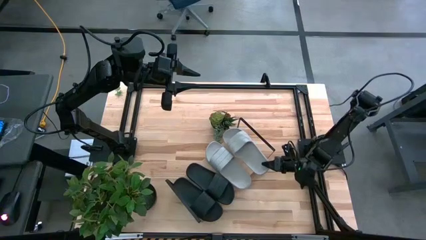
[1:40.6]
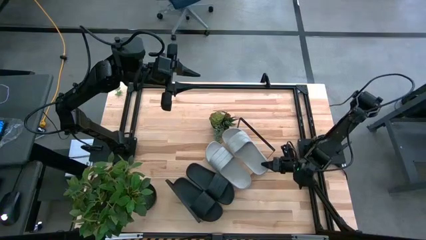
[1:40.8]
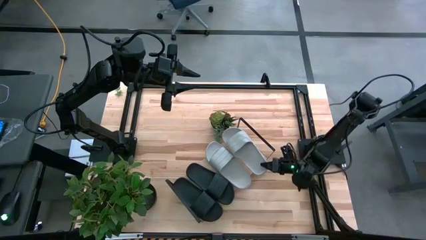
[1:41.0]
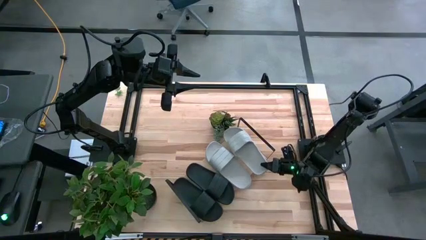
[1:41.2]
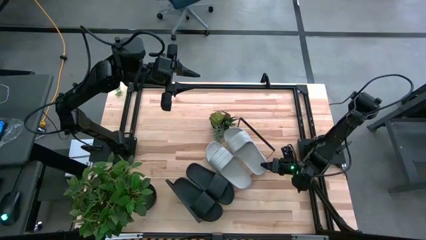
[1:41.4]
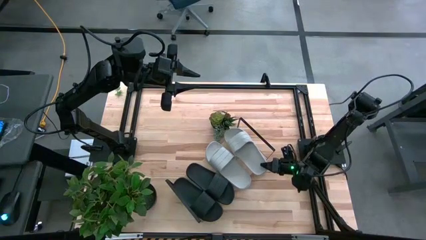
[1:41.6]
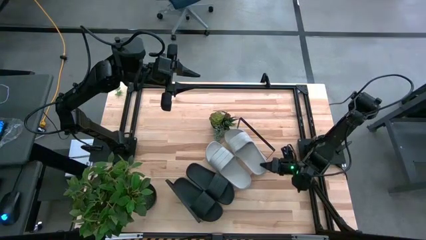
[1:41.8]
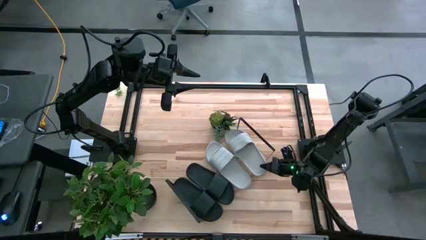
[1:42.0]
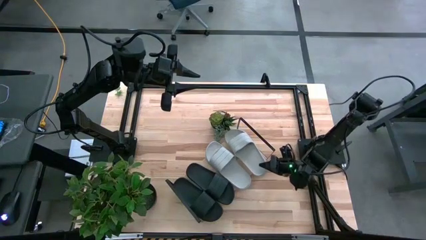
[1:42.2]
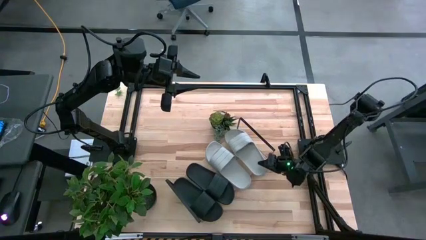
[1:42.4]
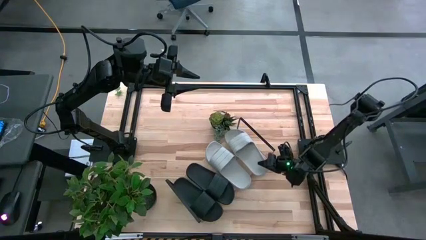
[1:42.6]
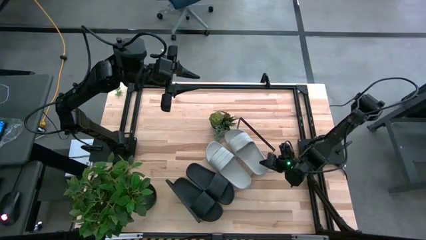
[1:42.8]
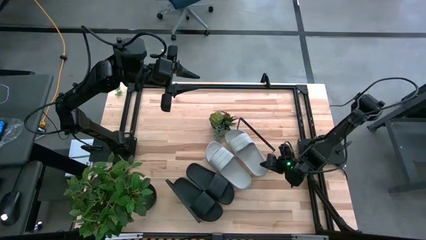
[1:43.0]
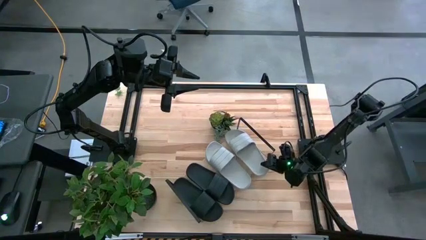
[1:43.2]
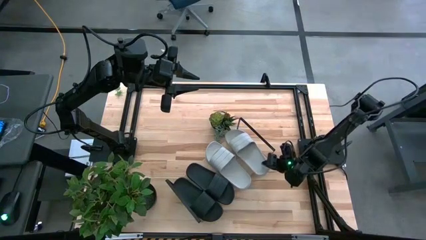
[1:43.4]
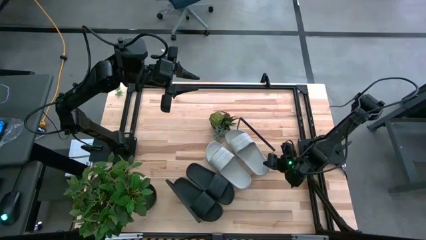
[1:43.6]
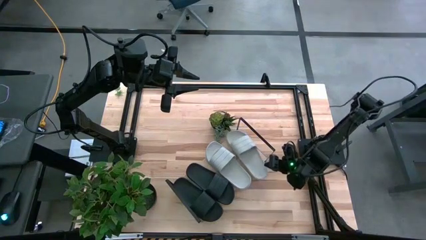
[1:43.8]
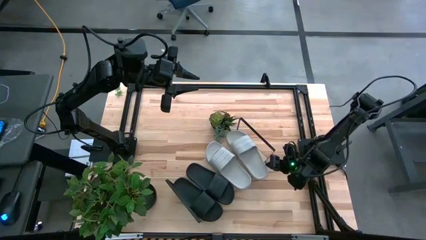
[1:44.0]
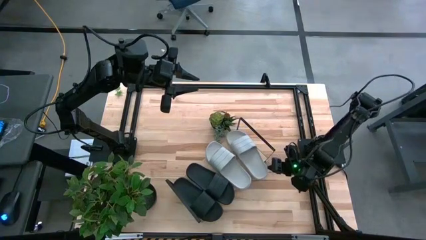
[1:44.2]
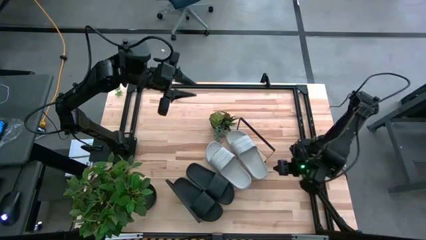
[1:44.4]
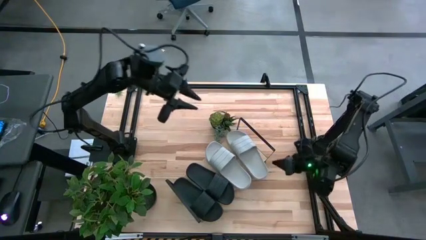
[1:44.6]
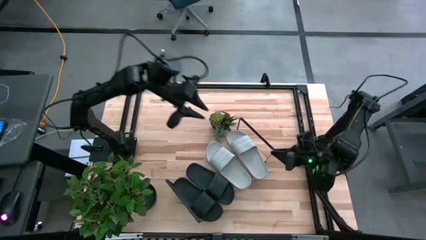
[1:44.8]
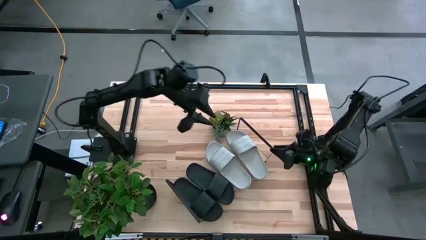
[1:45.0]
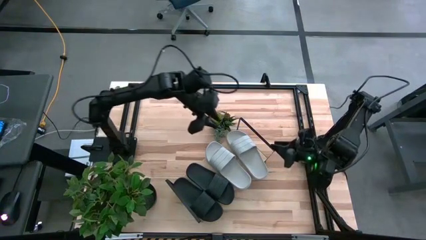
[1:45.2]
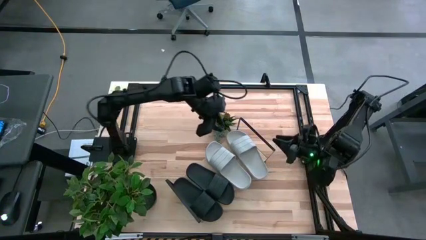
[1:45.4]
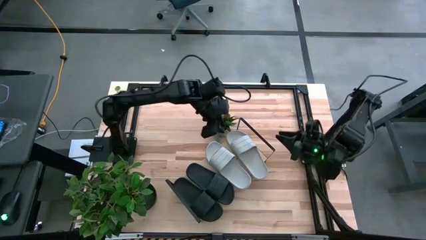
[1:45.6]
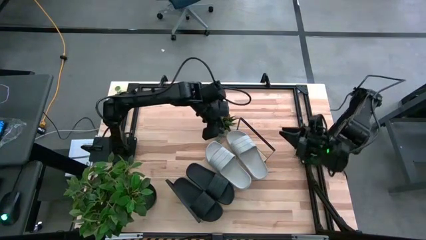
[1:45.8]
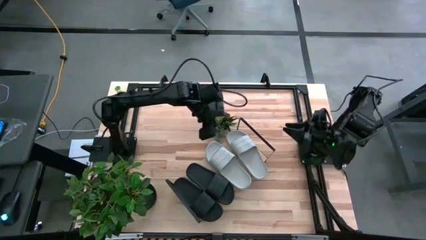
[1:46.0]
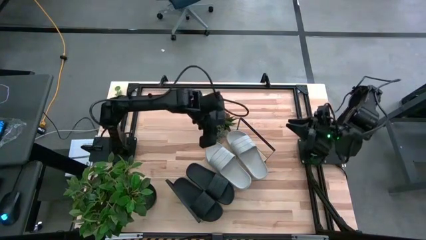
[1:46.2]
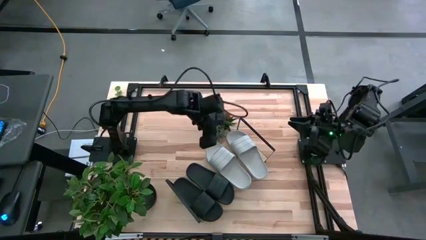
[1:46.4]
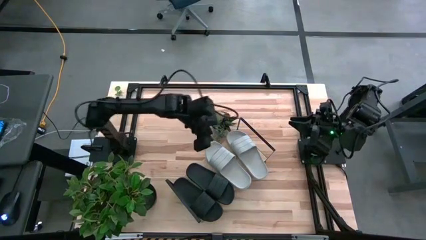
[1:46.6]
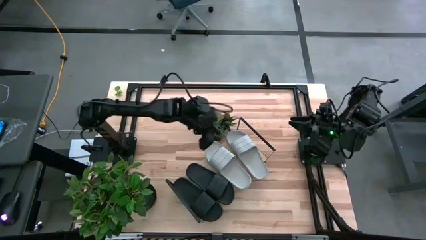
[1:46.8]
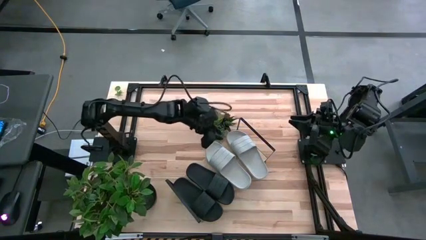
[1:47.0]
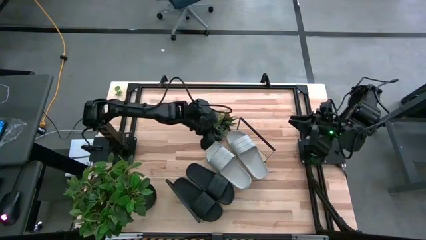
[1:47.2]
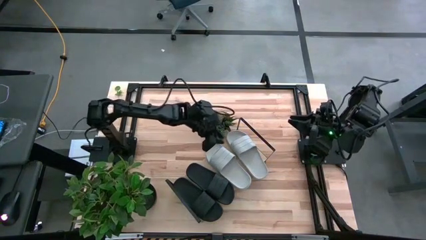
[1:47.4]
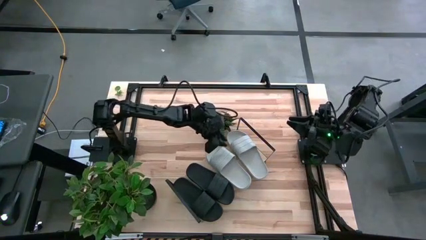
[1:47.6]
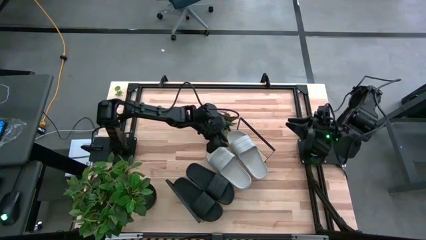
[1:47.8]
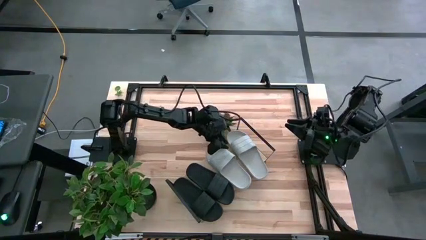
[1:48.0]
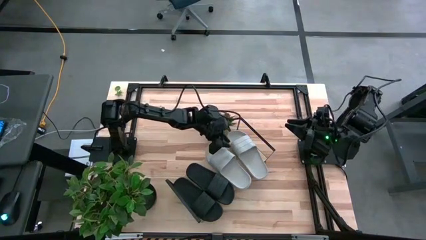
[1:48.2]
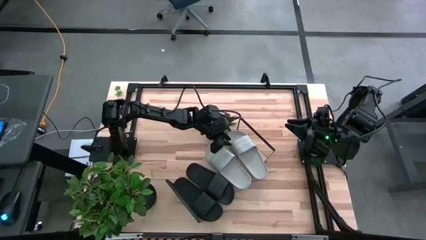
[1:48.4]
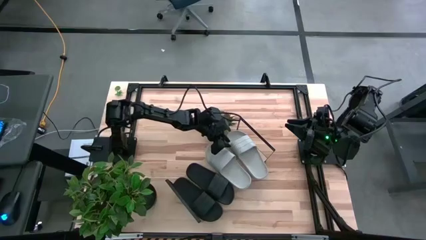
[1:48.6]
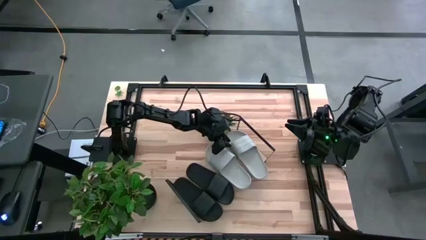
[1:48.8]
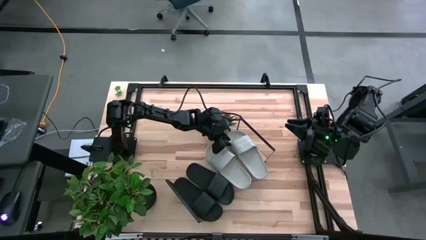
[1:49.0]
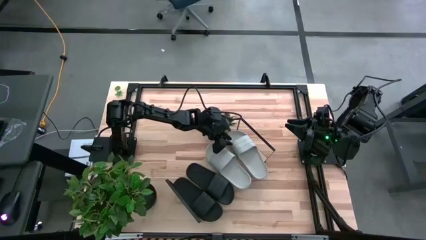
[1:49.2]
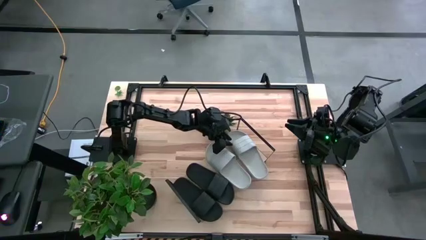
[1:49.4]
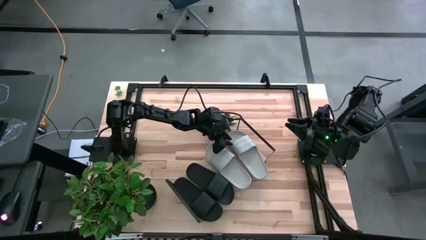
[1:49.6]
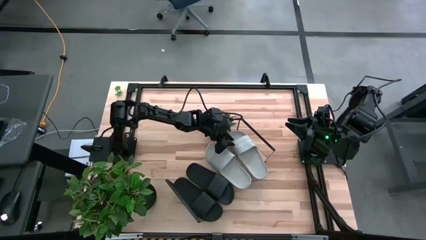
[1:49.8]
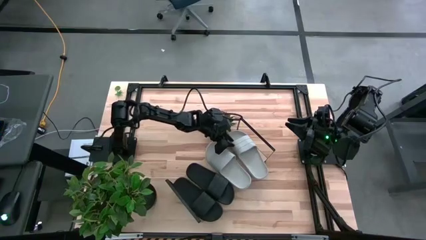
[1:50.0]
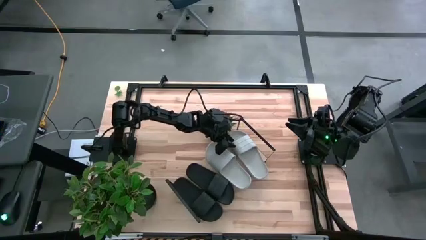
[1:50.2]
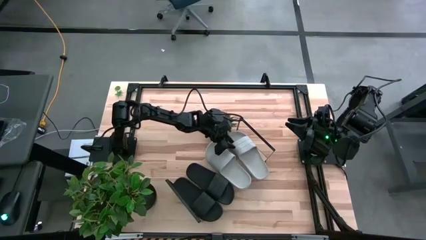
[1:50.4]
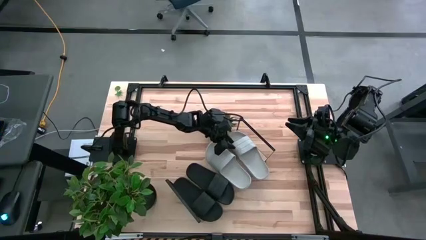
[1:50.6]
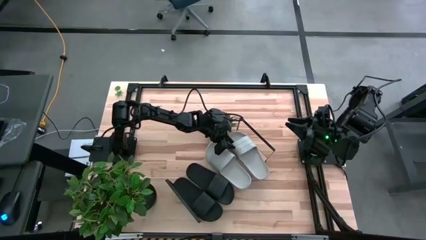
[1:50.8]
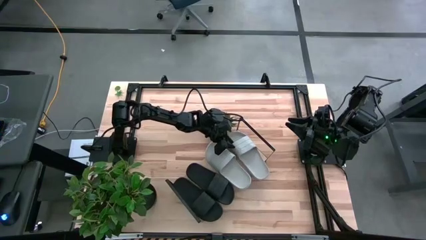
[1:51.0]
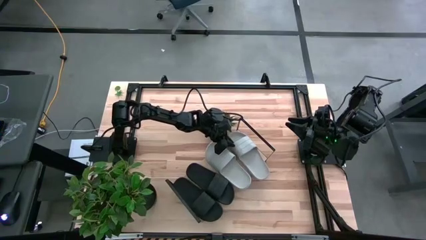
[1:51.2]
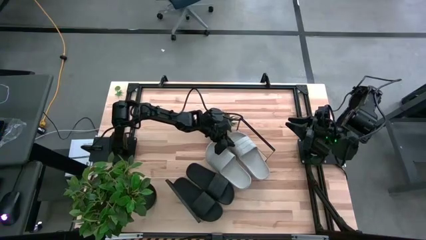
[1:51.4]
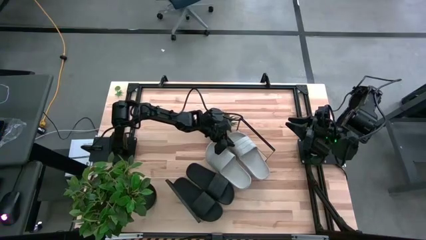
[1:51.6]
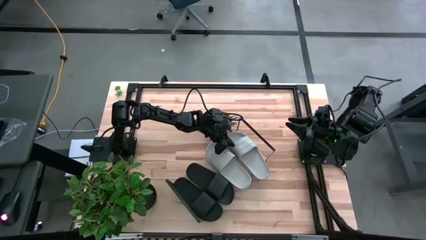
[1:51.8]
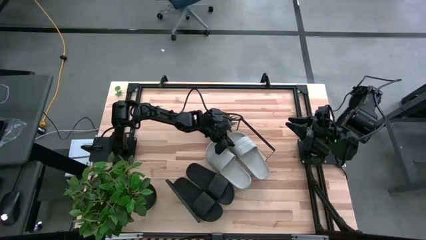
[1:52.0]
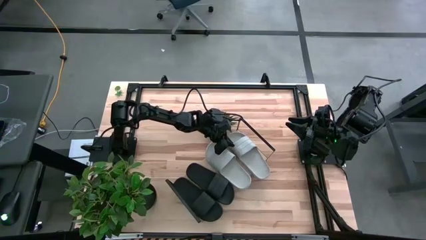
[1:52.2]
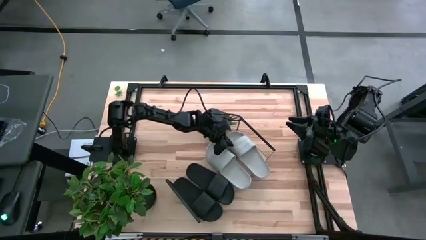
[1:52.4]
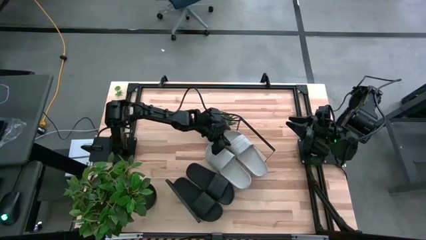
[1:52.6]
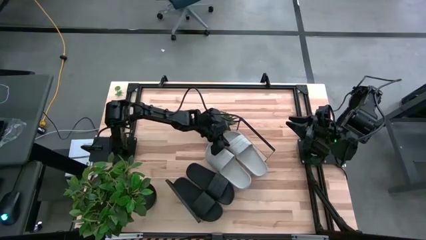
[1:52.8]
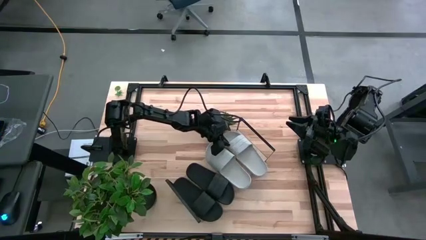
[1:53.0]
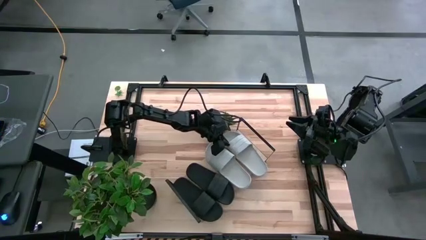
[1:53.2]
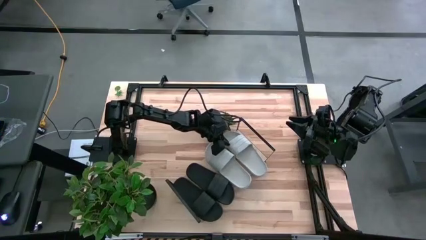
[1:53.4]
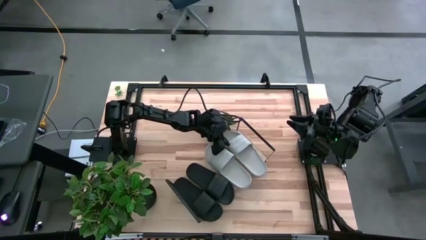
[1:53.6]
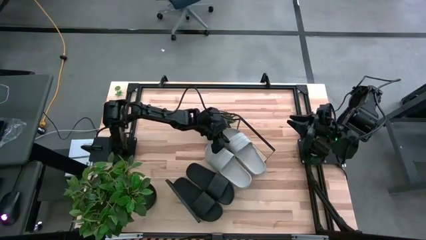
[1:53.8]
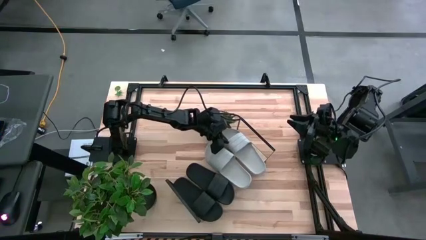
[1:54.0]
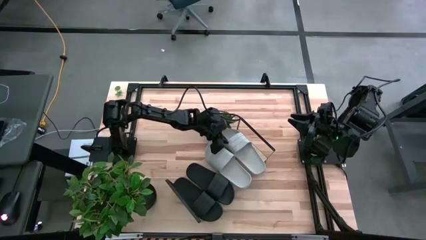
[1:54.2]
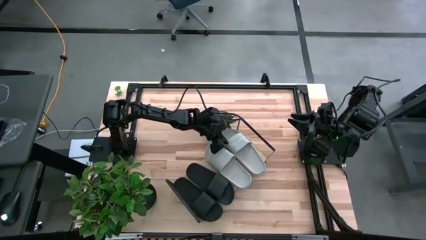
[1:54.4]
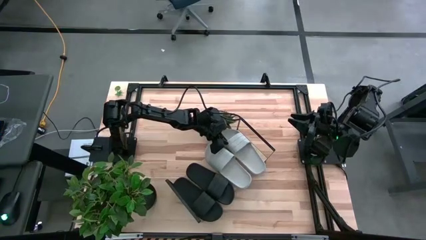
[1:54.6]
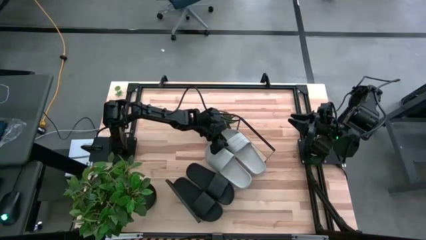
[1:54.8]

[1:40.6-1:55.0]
Task: Pick and place slides into the shelf
Put the gray slipper on the shelf
